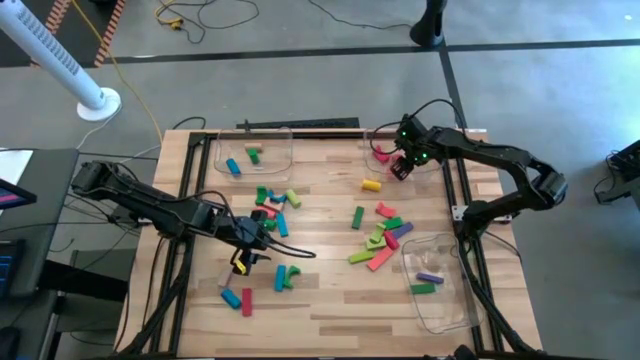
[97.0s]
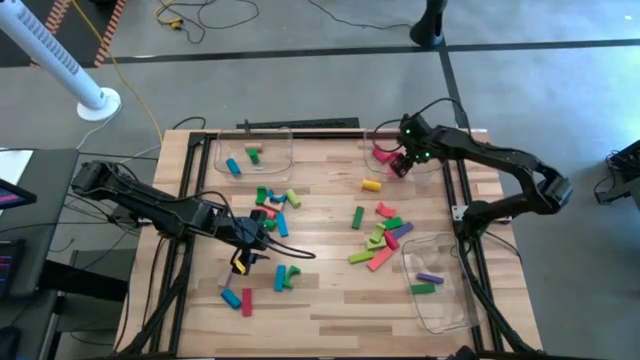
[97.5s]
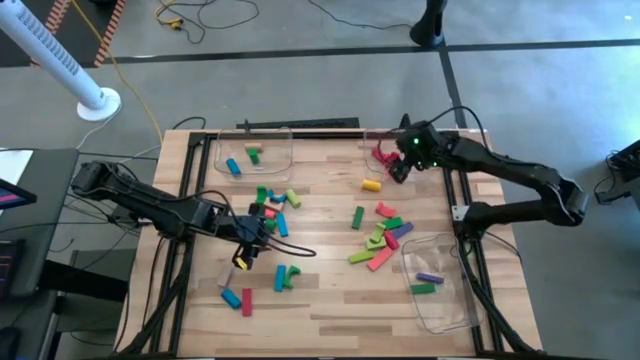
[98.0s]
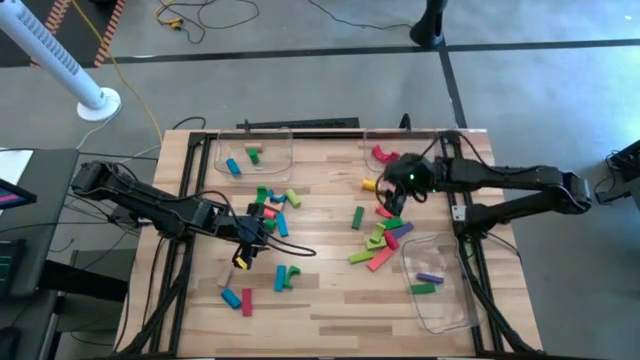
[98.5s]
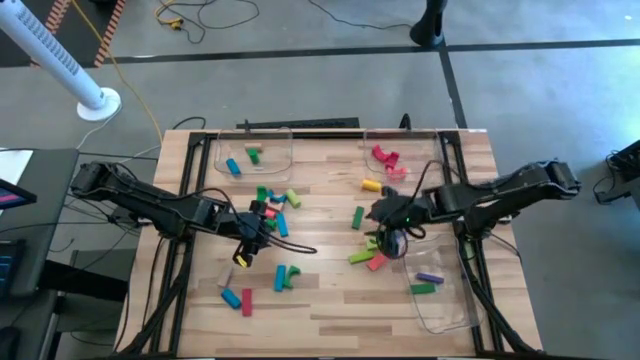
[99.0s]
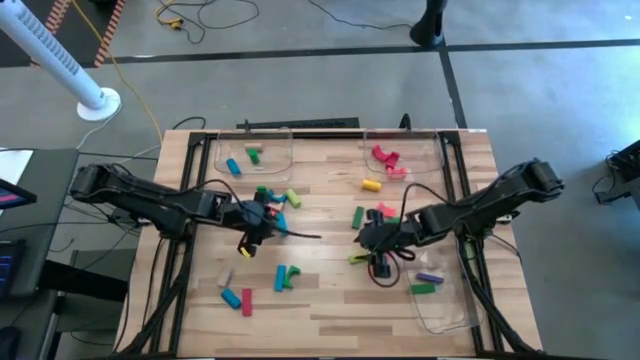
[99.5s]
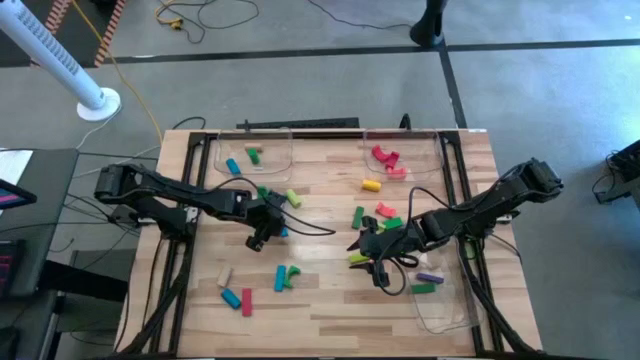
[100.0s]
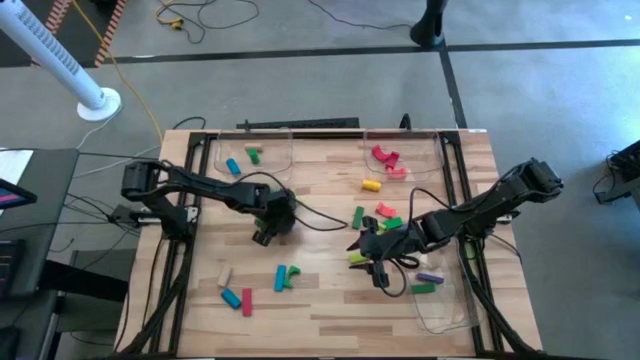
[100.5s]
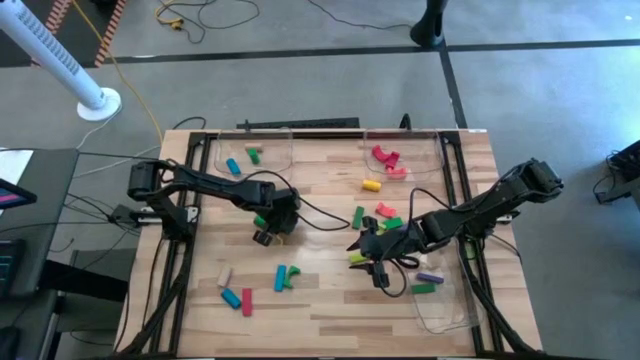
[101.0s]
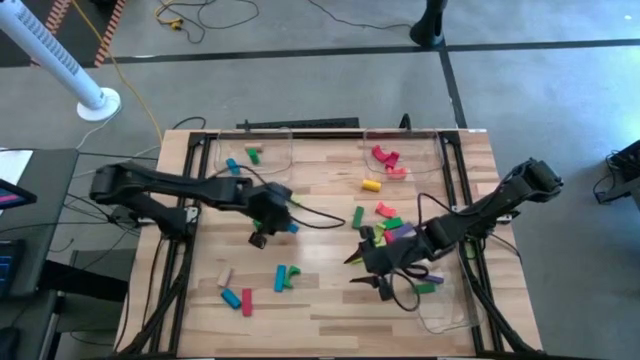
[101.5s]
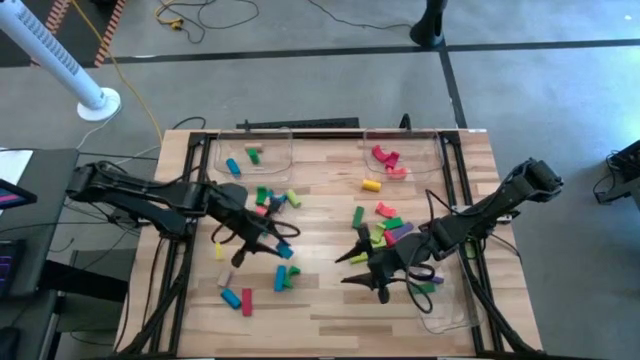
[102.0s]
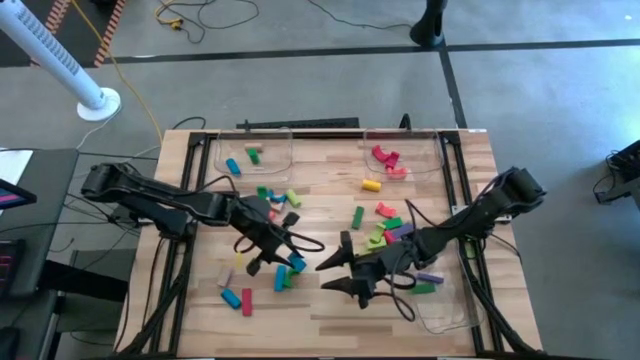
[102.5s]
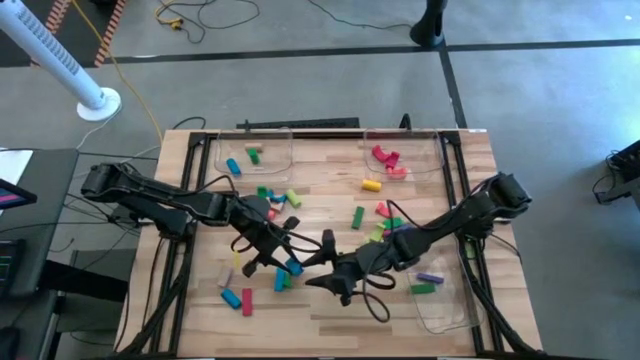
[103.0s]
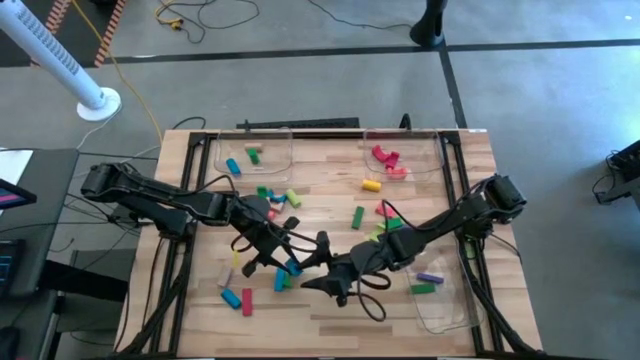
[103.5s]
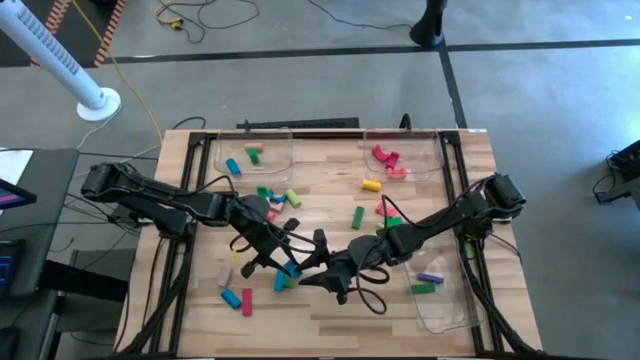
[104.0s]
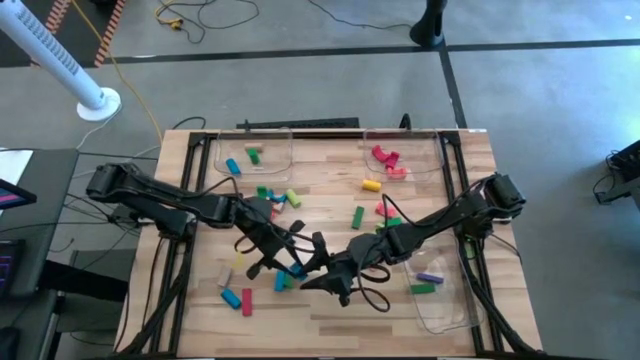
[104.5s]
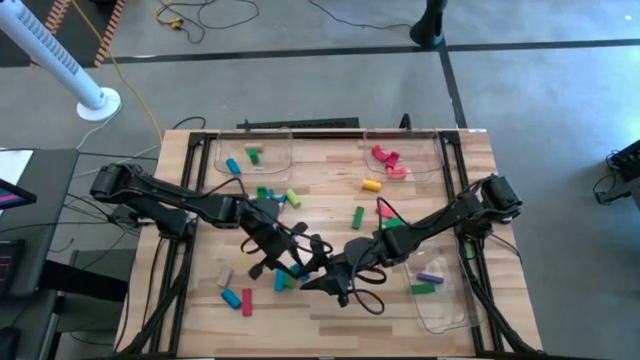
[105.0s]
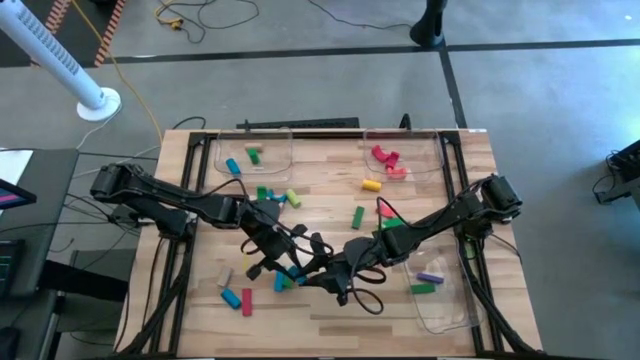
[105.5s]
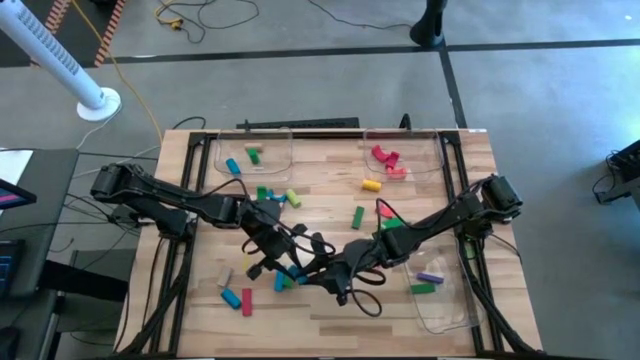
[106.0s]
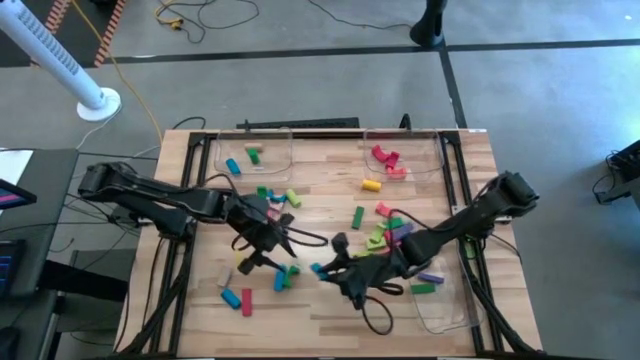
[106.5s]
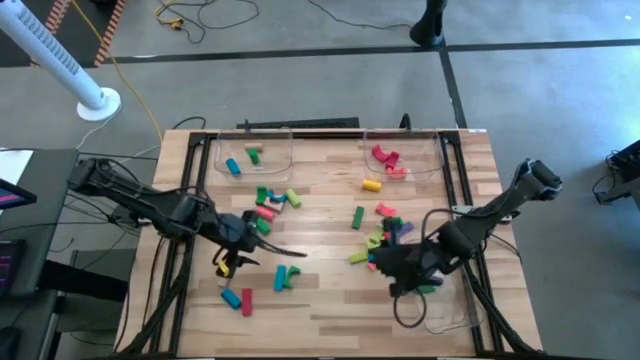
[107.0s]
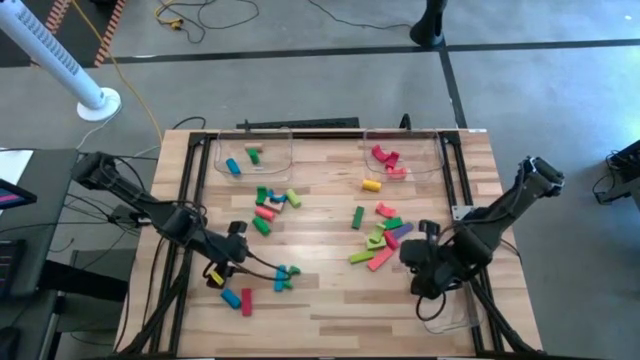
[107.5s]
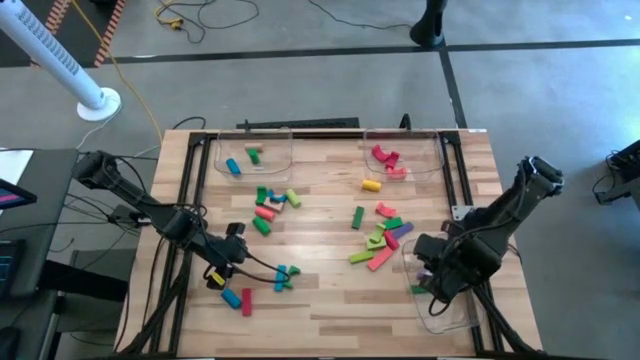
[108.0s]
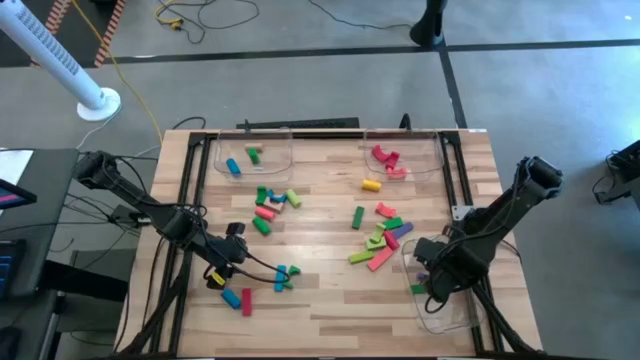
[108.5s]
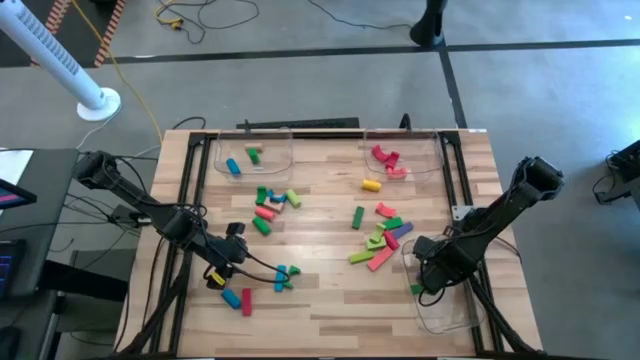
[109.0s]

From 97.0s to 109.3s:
Task: Sort blocks by size
Put the blue rectangular block into the bottom transparent bin

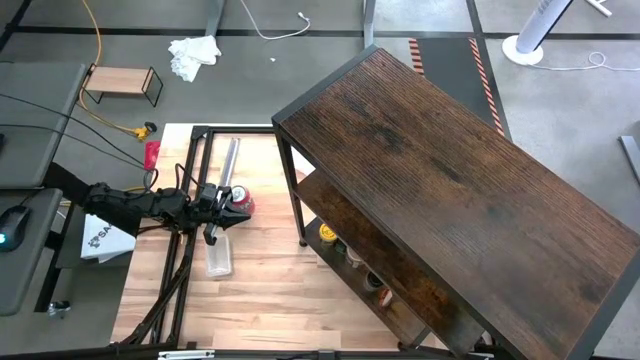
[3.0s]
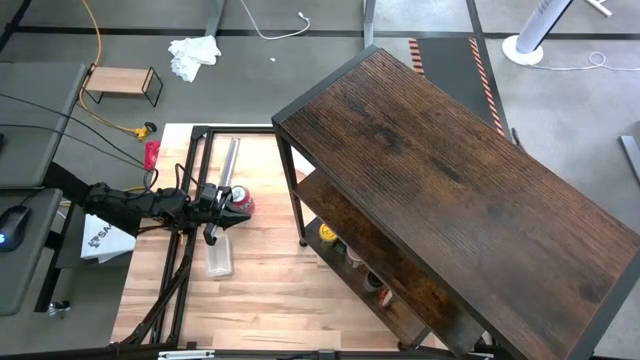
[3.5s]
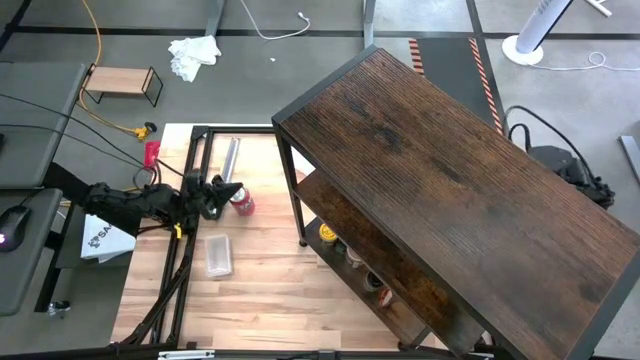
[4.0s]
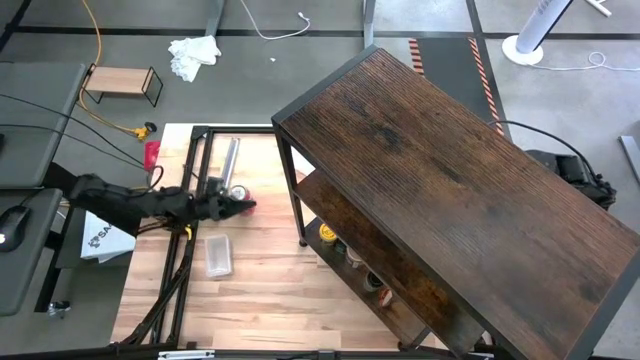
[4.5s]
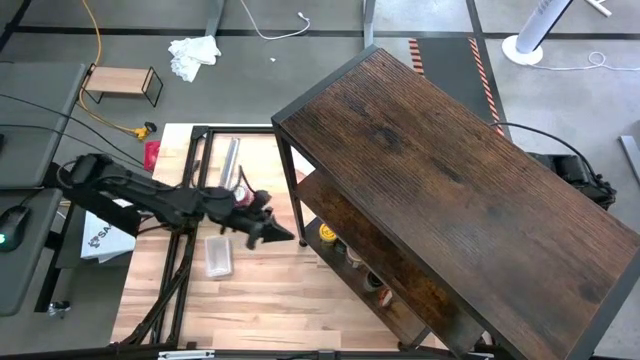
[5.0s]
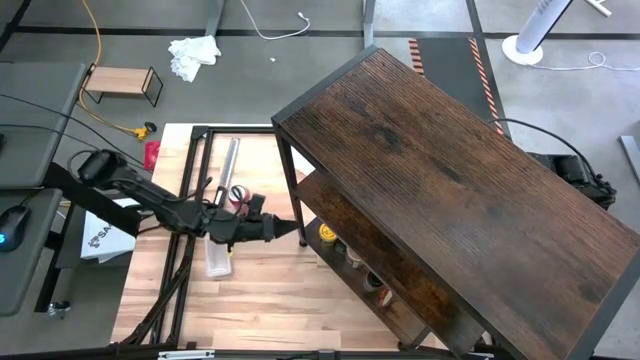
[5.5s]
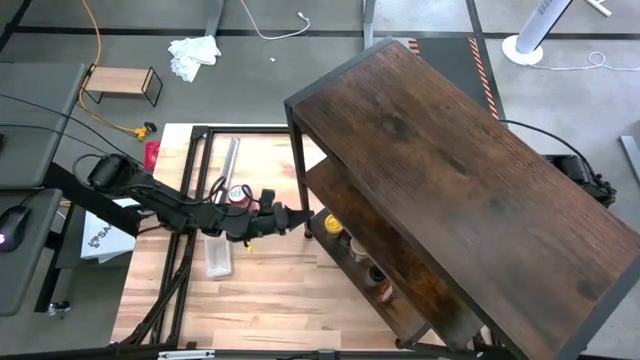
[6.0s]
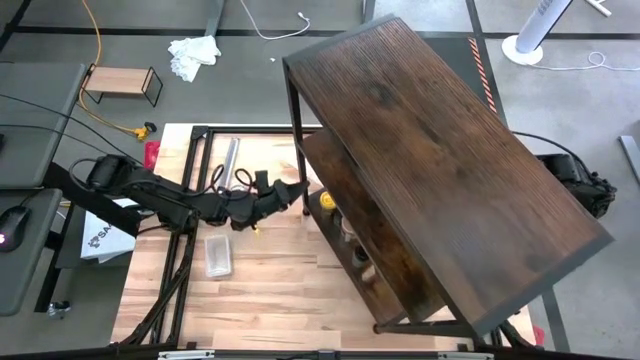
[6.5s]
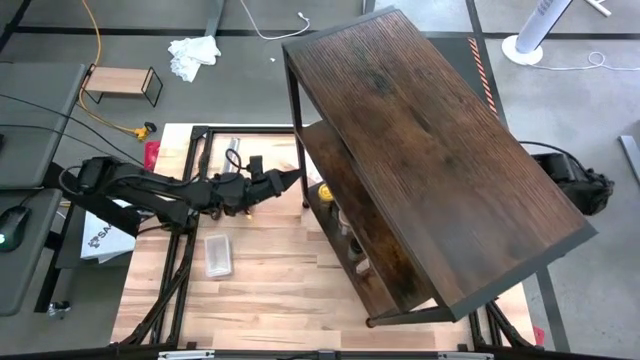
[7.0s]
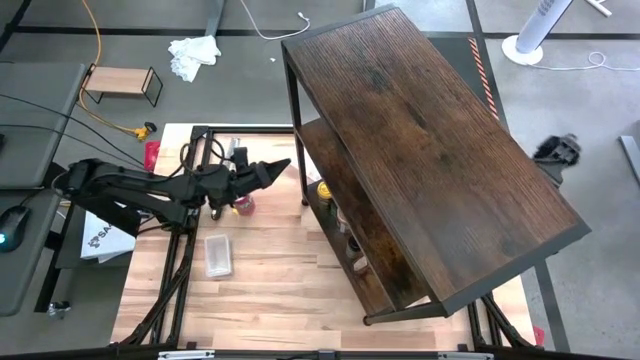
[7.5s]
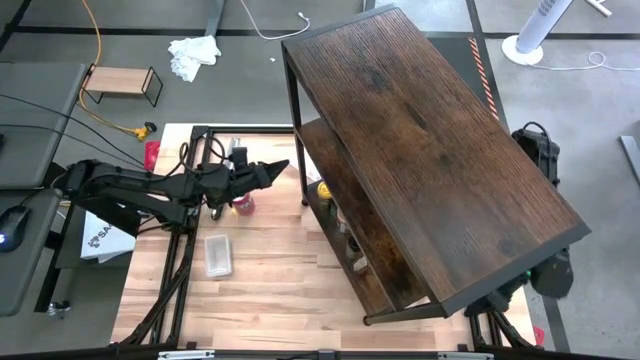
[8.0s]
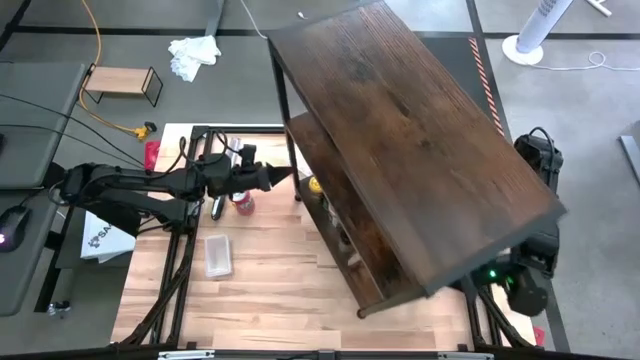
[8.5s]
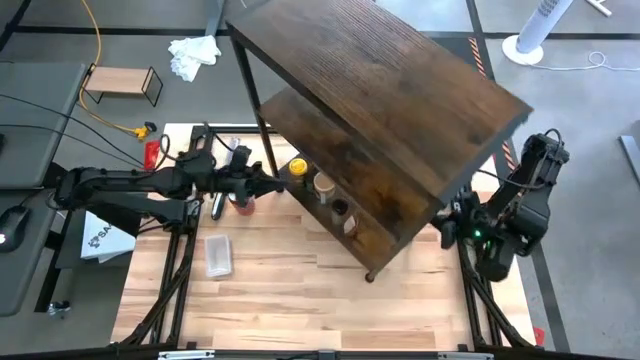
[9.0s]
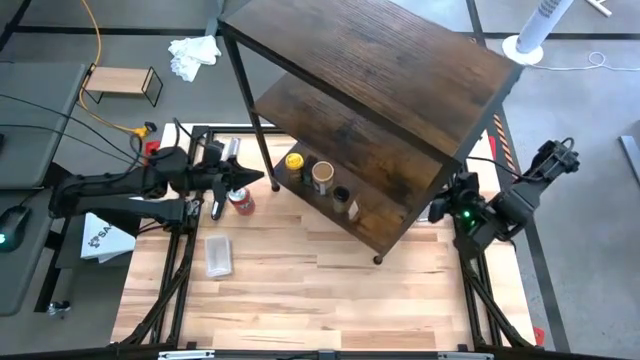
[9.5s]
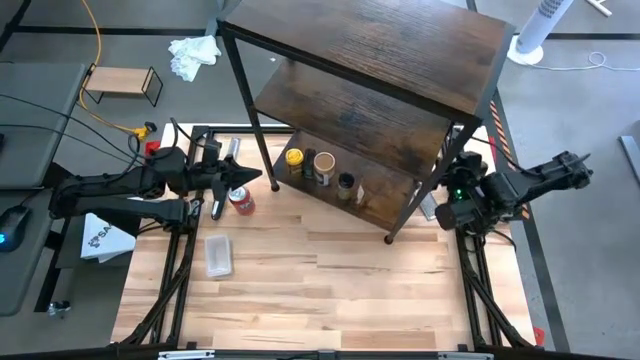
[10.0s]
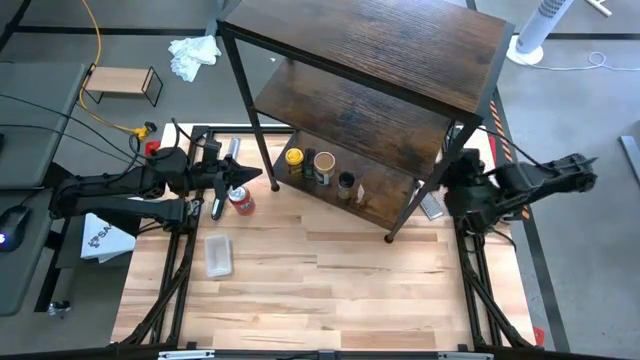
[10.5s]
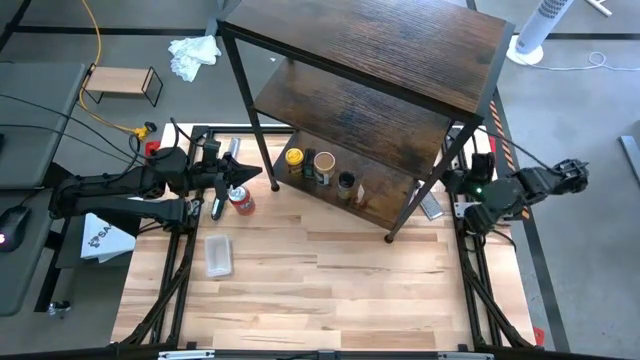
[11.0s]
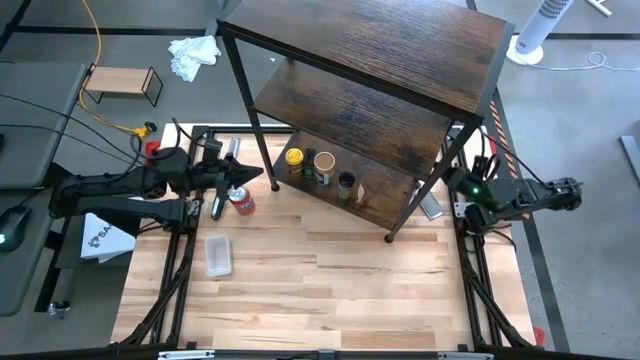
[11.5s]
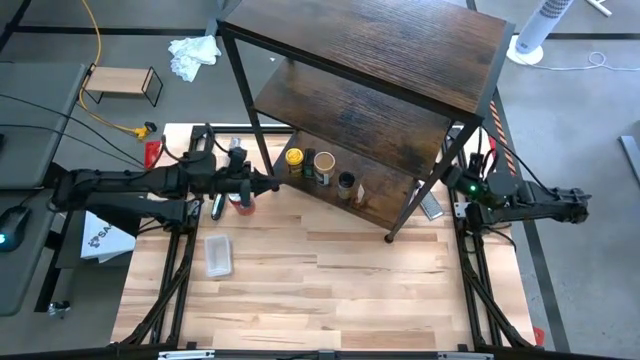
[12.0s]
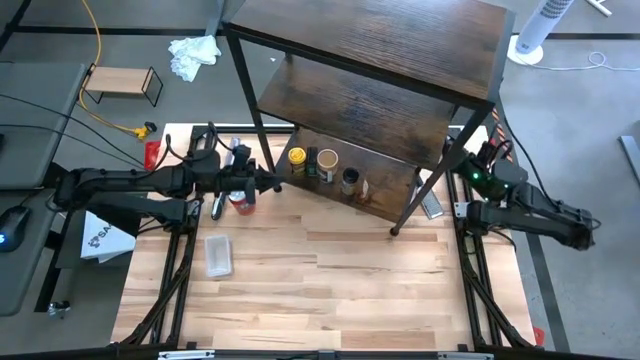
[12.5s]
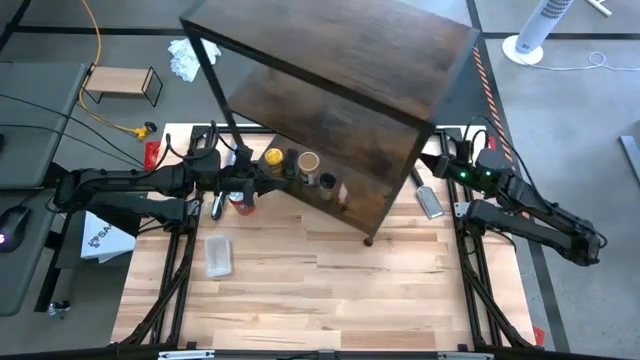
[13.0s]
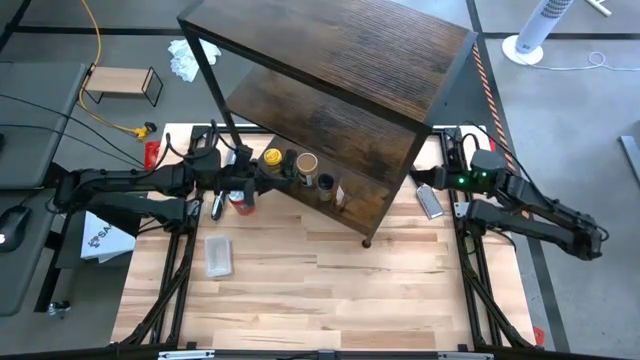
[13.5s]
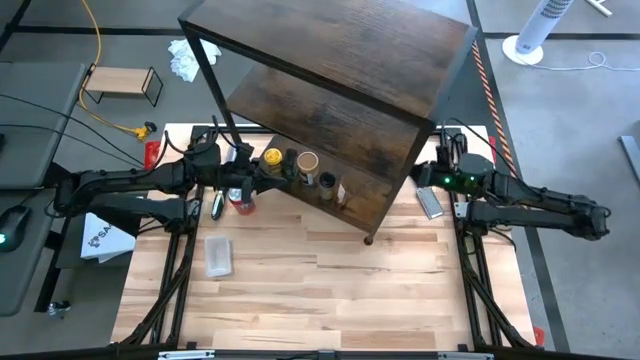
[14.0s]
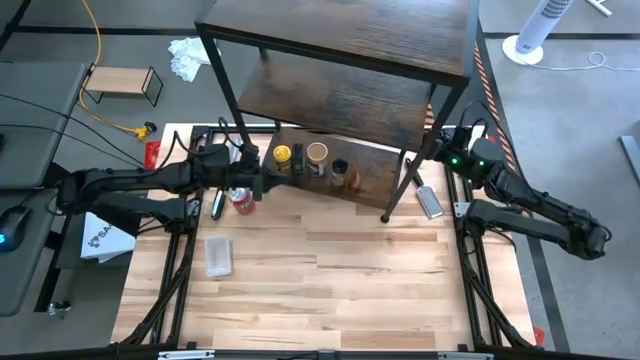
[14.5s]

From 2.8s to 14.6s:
Task: Shelf spices
Move the shelf on the top middle of the table
